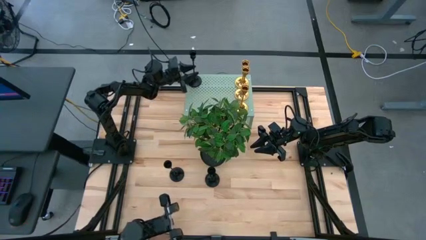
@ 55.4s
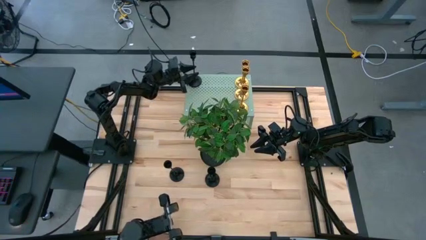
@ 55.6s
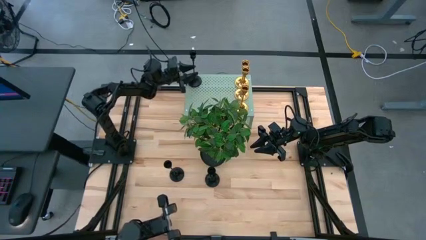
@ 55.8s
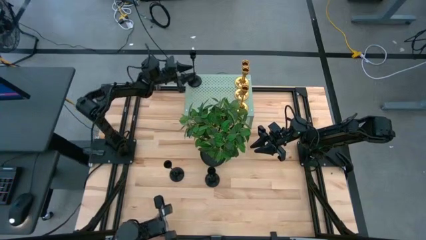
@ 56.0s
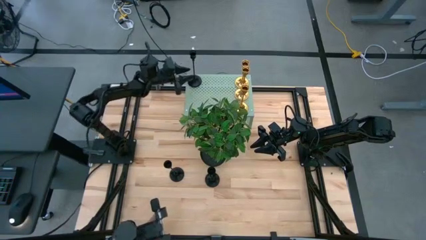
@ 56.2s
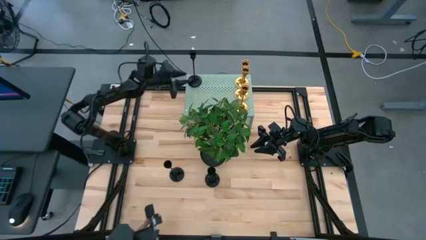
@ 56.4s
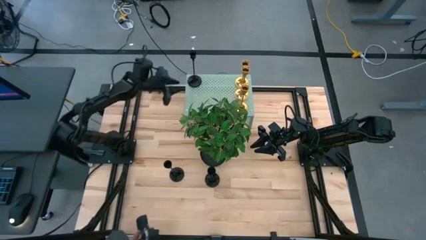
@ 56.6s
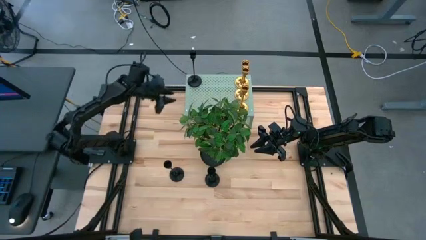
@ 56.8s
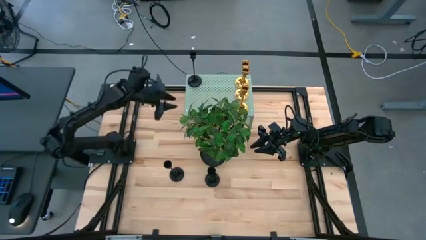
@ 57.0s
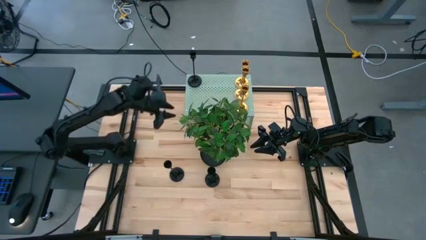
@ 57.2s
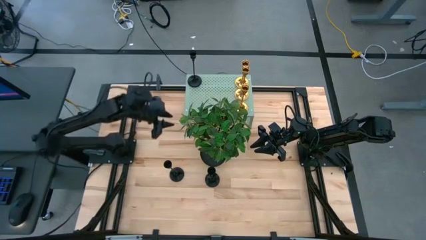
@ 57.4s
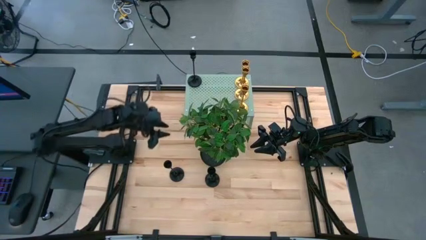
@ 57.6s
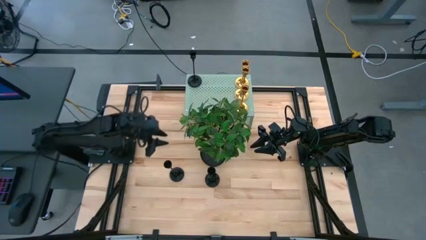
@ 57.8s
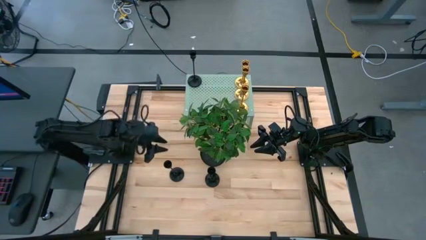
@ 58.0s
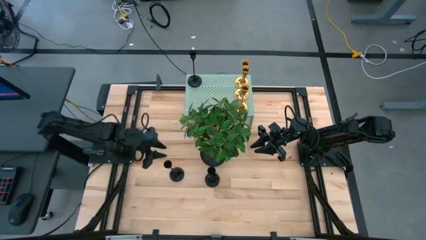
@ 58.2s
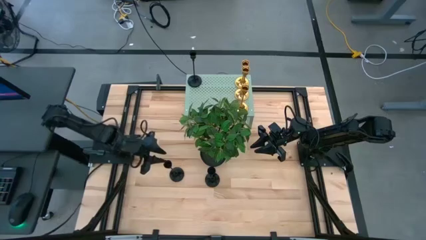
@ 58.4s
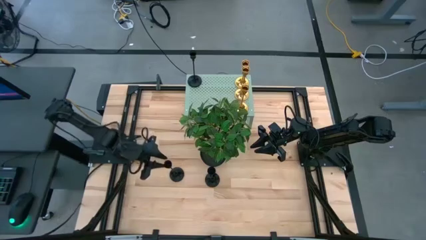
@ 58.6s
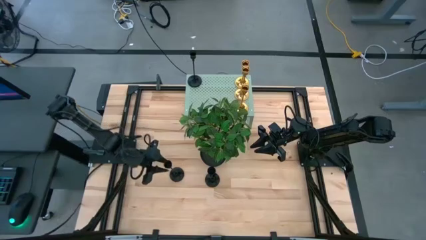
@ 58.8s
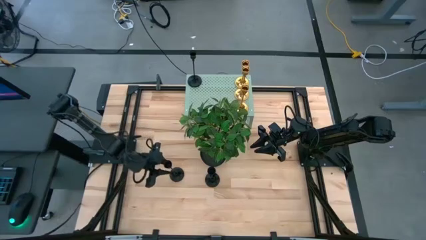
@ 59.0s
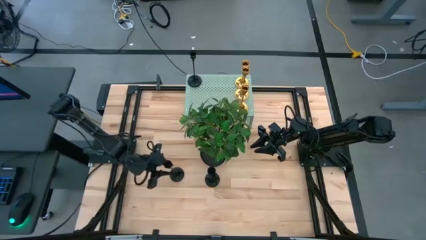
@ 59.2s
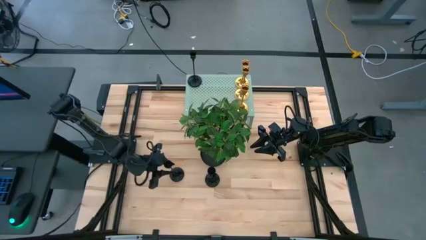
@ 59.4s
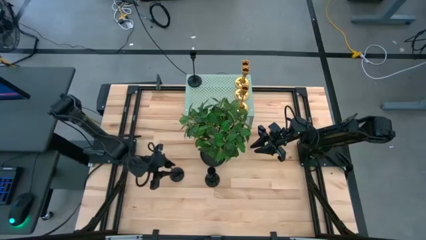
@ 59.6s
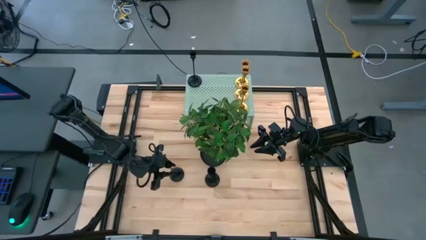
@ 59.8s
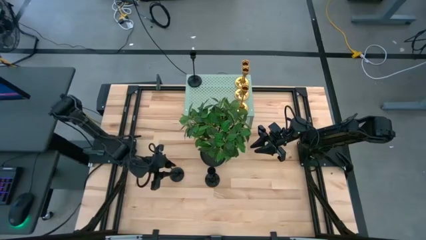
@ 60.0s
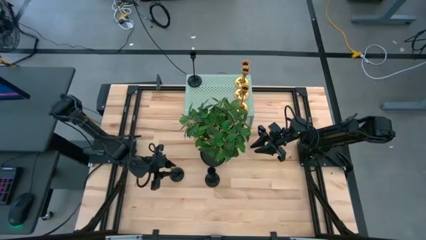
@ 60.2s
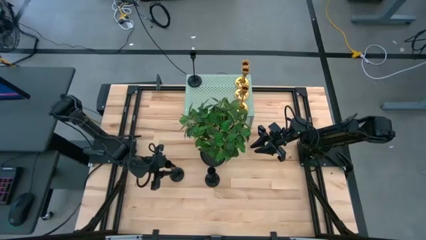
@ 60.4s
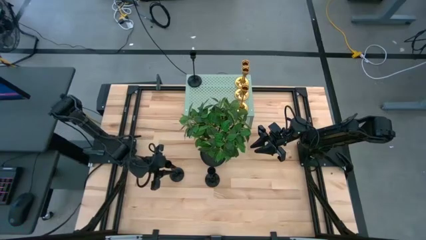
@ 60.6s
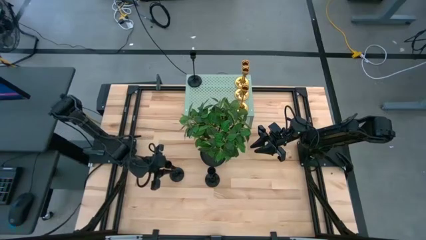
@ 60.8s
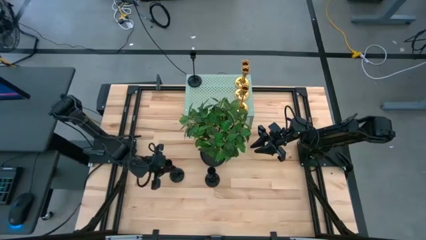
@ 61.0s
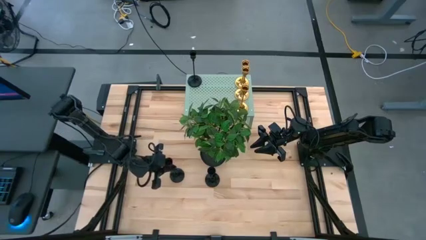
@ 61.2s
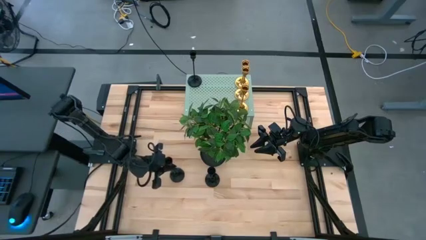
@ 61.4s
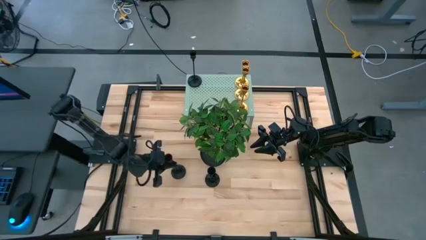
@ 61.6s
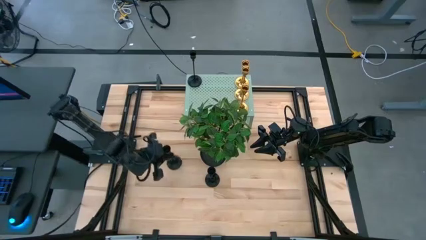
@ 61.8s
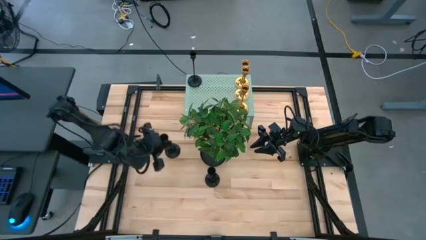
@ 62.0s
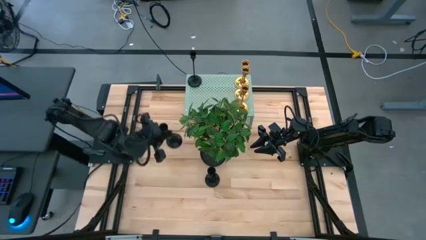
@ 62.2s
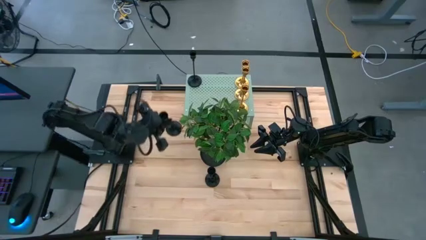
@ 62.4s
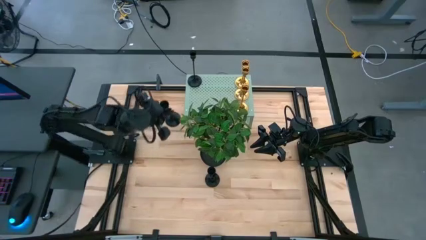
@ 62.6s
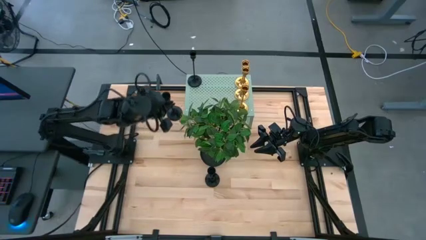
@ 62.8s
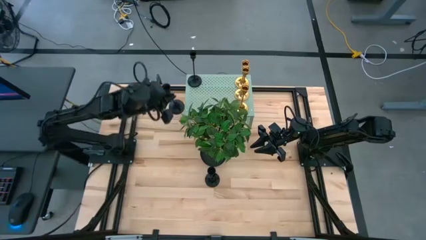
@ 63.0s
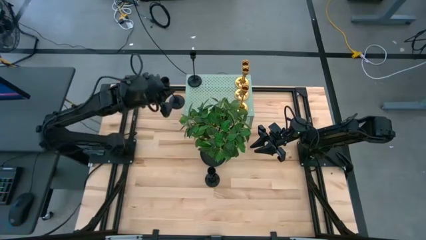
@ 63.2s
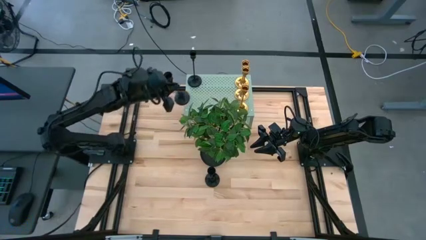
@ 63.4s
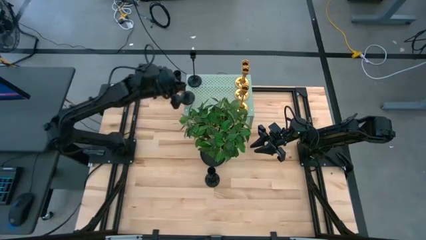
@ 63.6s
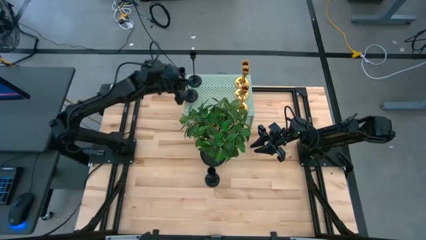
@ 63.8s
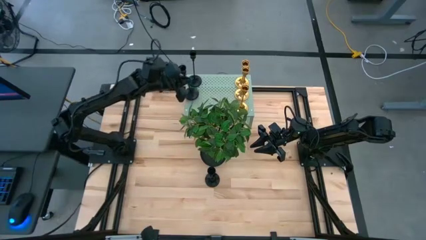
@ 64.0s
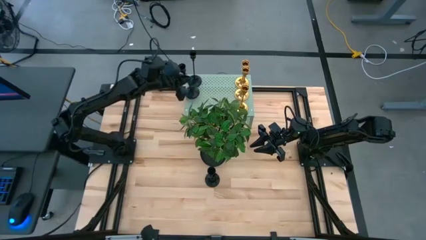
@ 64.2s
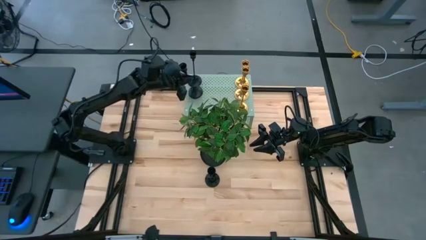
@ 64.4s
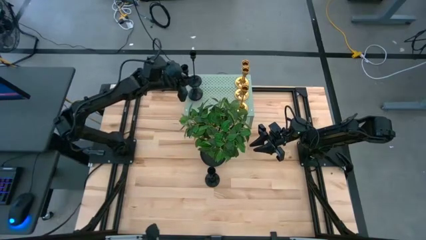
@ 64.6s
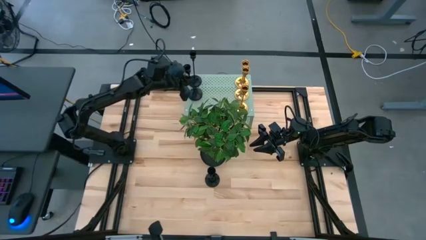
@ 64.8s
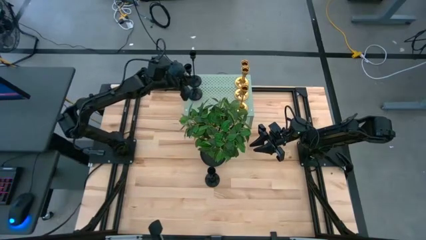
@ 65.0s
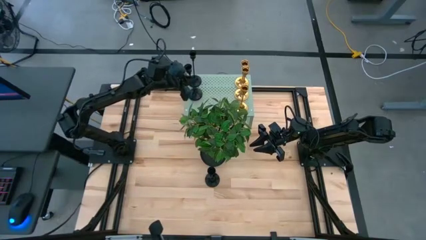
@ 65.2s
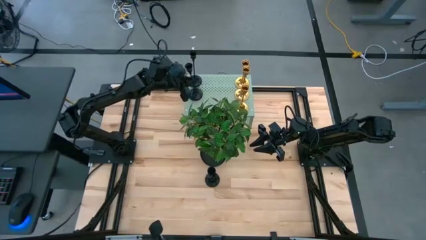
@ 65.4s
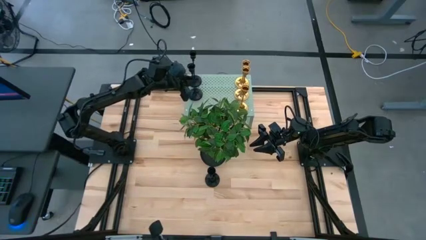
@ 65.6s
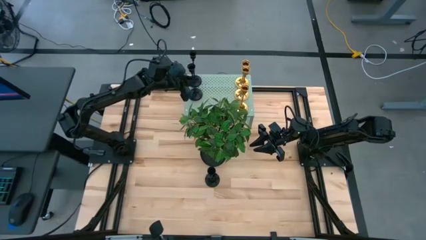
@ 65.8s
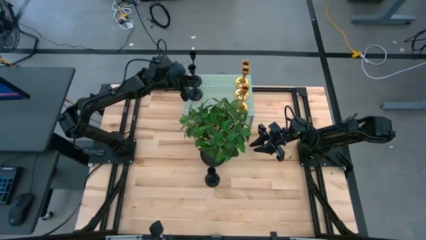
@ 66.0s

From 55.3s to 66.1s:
Task: Pick & Place candle stick holders
Put the left black candle holder on the shelf aligned with the other black candle holder

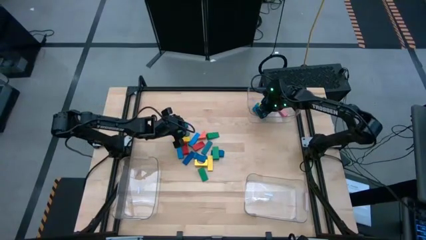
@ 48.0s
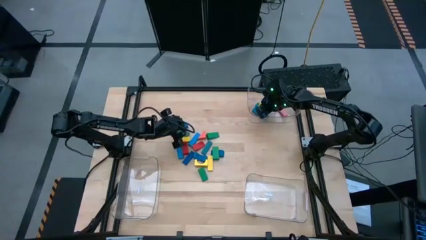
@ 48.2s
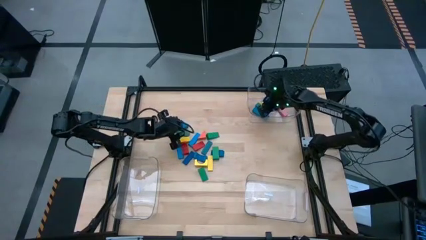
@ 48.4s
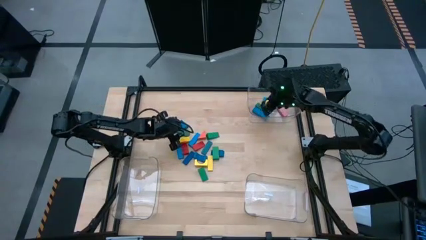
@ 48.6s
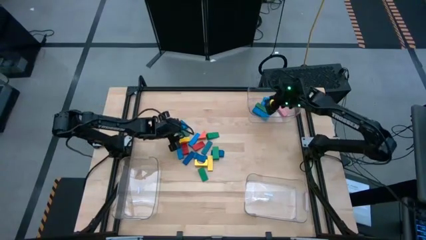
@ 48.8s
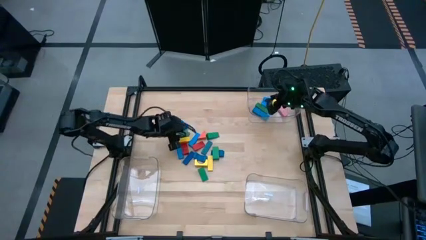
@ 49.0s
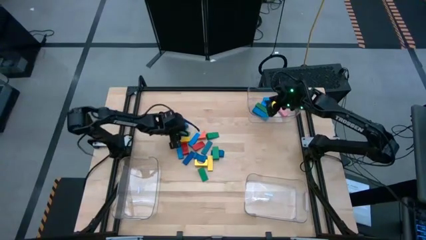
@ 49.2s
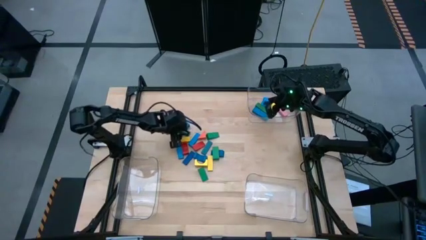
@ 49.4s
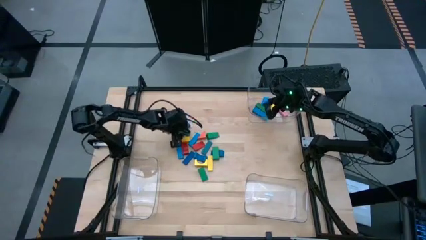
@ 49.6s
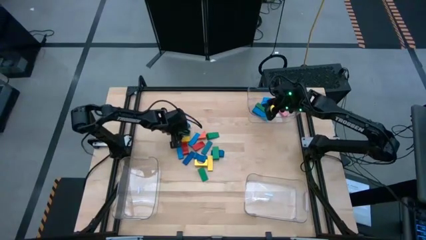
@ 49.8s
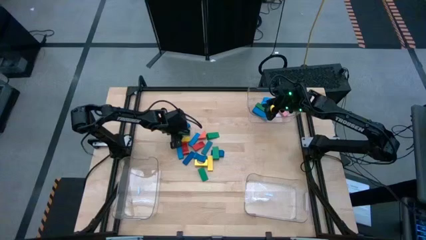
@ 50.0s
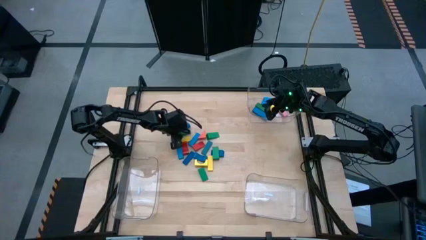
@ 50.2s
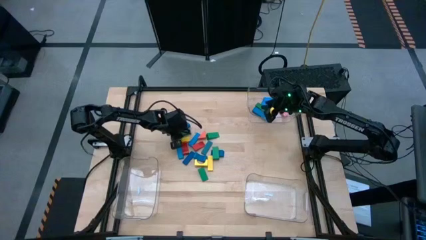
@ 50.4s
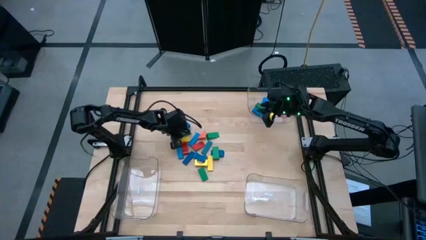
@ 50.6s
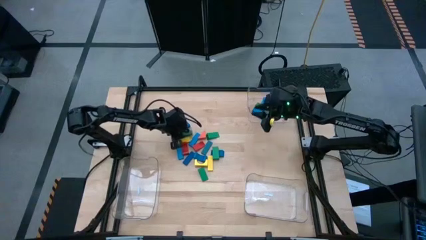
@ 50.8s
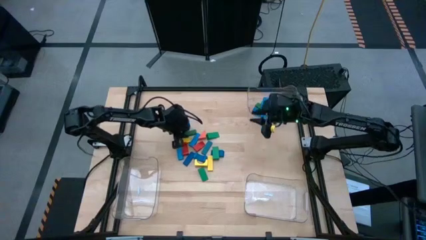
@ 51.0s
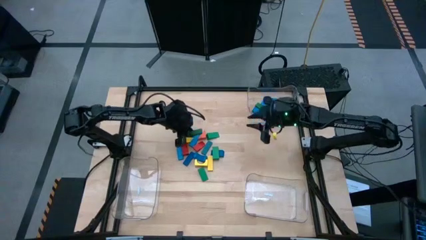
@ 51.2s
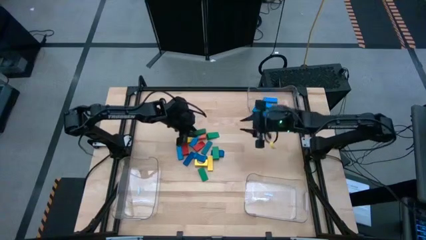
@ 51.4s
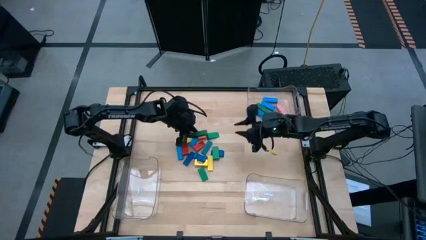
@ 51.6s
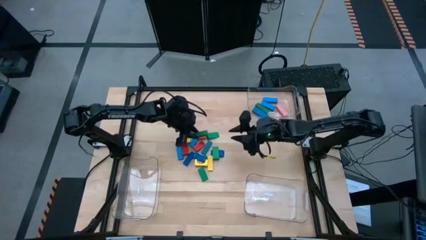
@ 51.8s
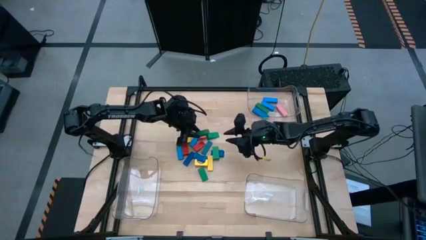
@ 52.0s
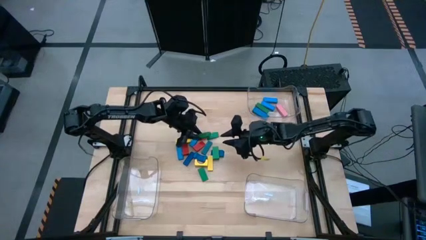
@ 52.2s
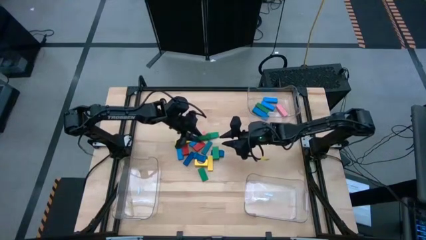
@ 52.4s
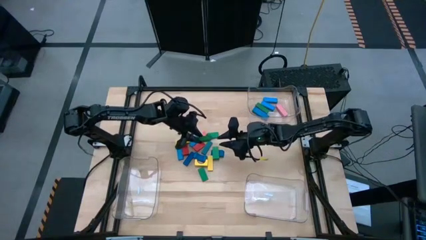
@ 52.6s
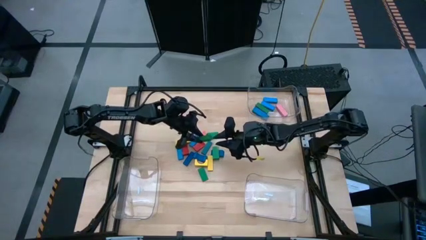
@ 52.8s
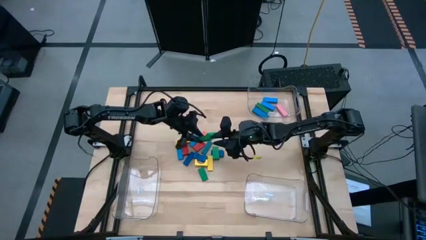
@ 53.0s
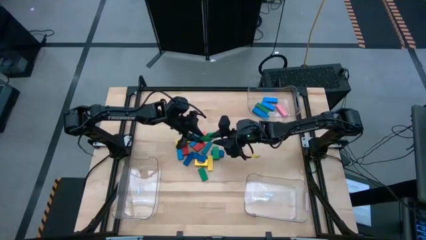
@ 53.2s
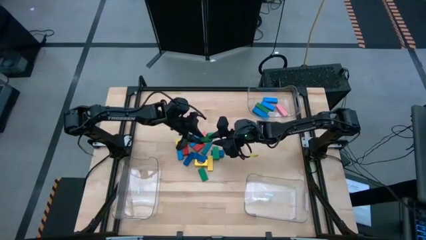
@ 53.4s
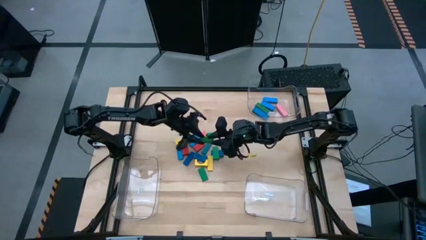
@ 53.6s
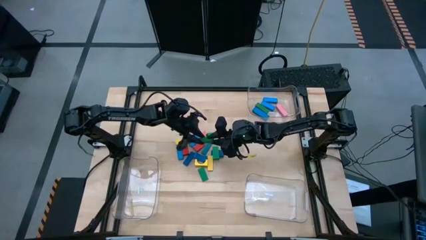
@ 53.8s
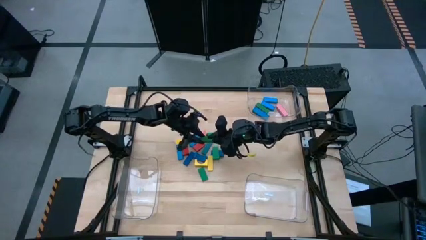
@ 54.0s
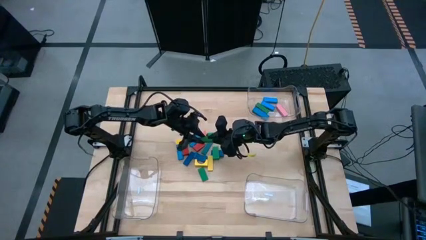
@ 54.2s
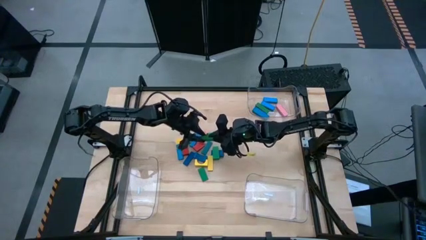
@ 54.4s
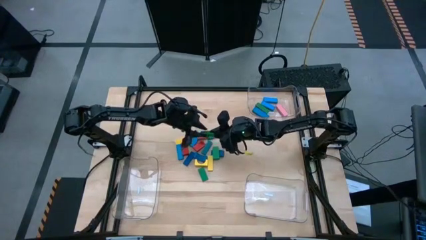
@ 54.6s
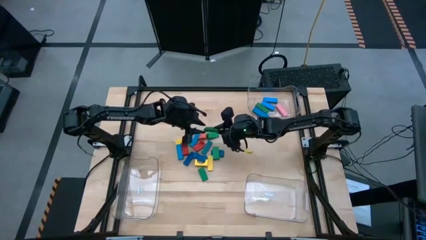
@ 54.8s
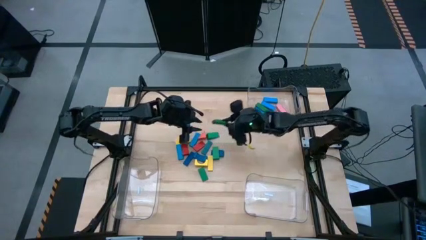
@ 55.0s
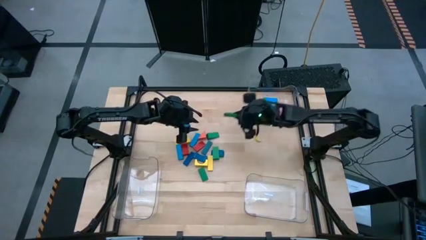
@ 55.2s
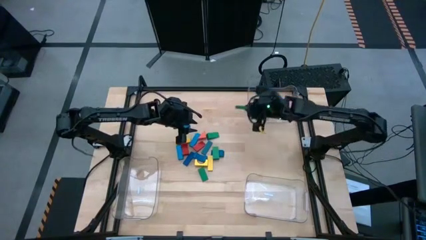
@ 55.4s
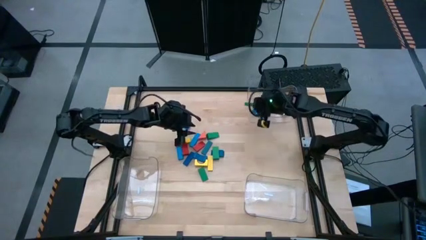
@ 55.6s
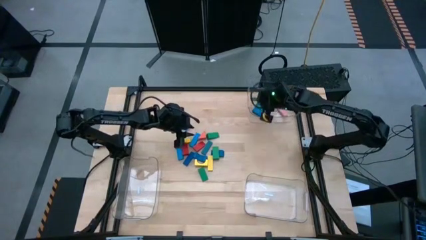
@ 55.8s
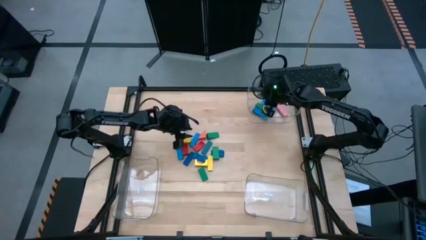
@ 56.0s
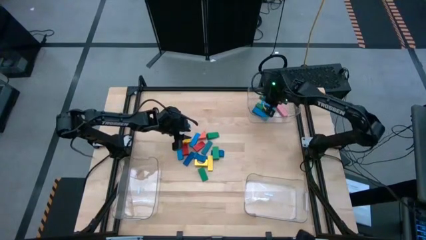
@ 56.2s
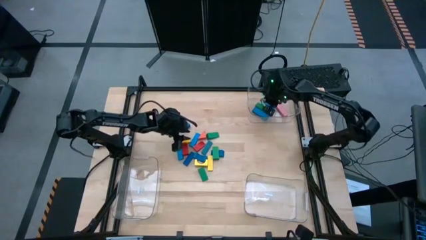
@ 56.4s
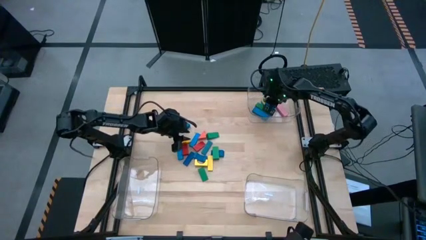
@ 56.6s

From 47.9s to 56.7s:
Task: Sort blocks by size
Put the green rectangle block into the top transparent bin
